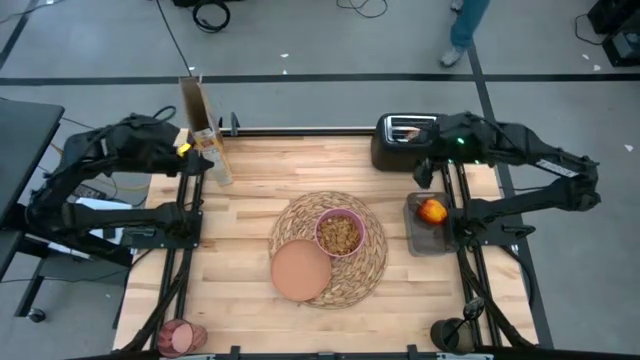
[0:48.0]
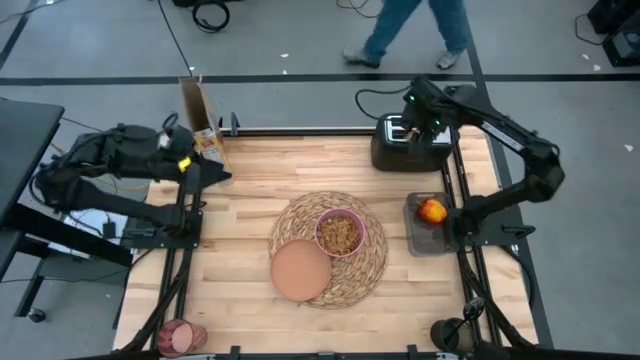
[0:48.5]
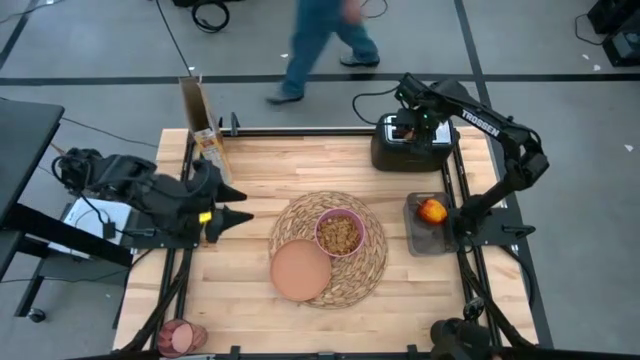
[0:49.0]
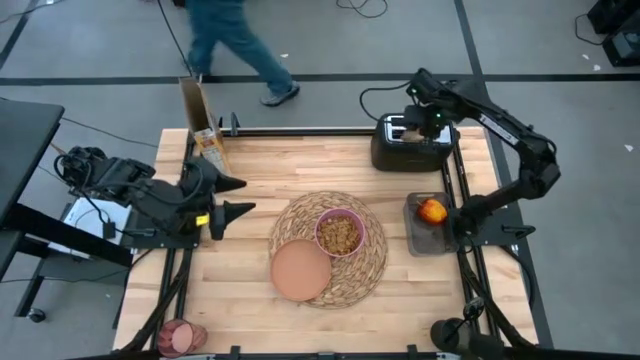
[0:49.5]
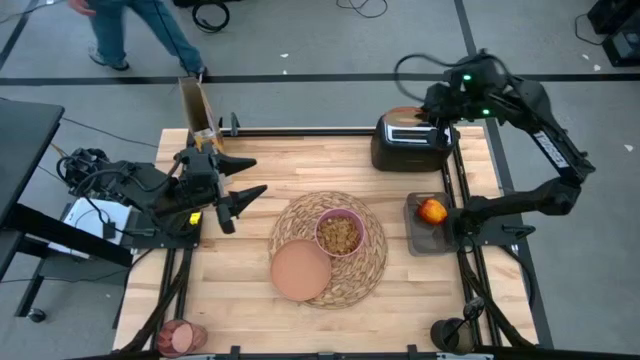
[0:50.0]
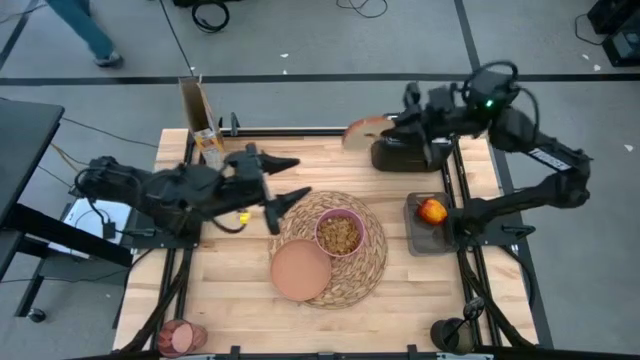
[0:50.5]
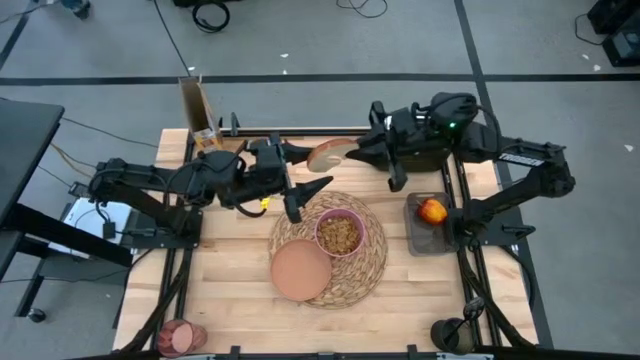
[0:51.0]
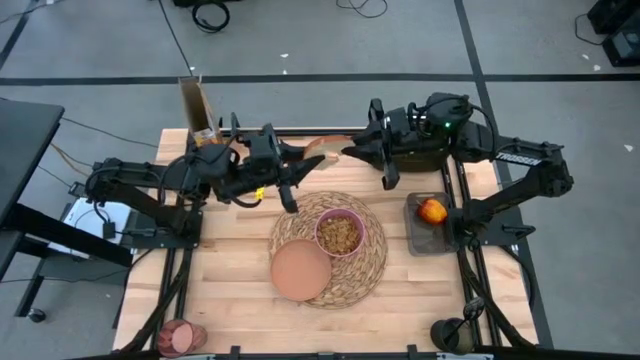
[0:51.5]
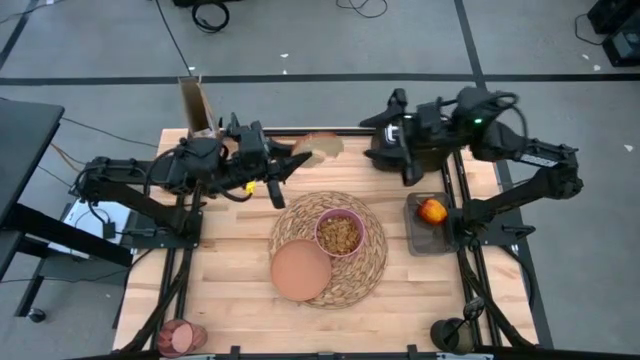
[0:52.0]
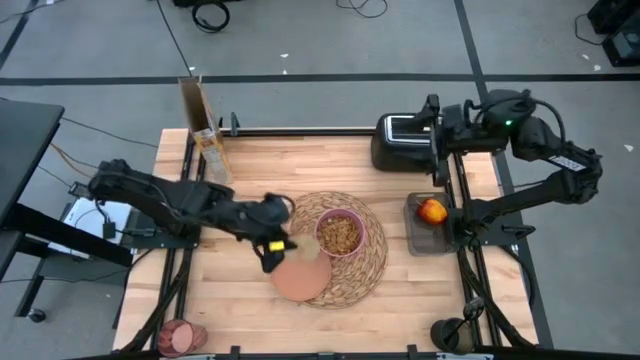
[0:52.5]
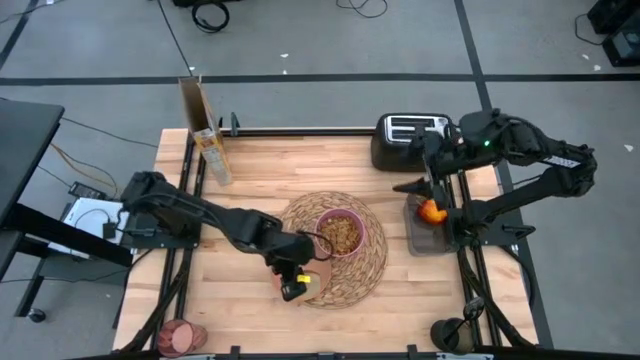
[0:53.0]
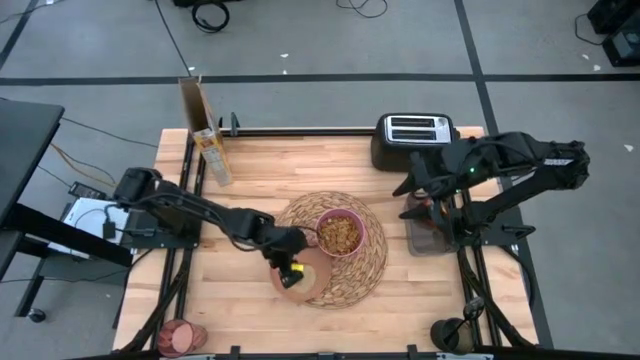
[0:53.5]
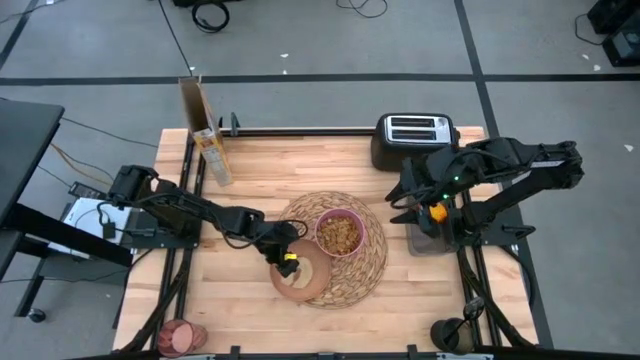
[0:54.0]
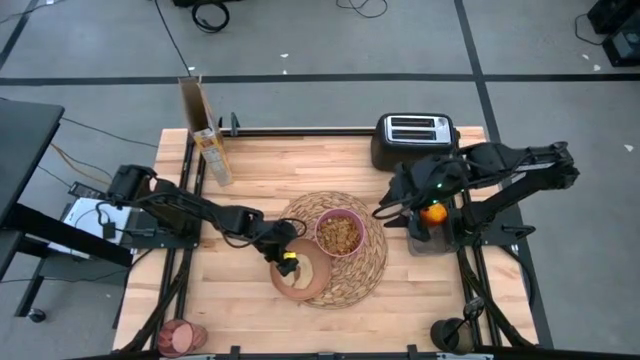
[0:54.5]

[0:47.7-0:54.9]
Task: Arrange a breakfast setting
Put the toasted bread on the light orange plate

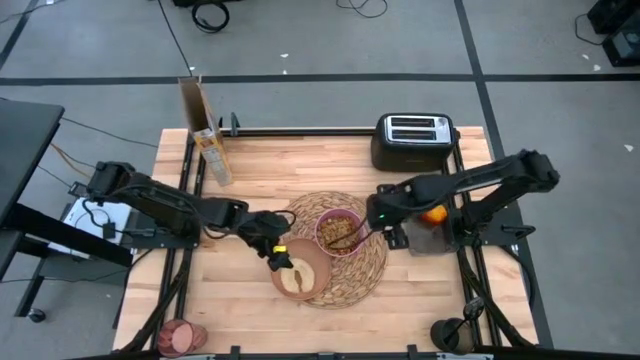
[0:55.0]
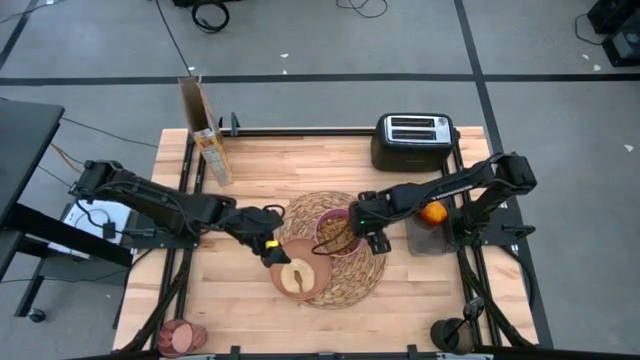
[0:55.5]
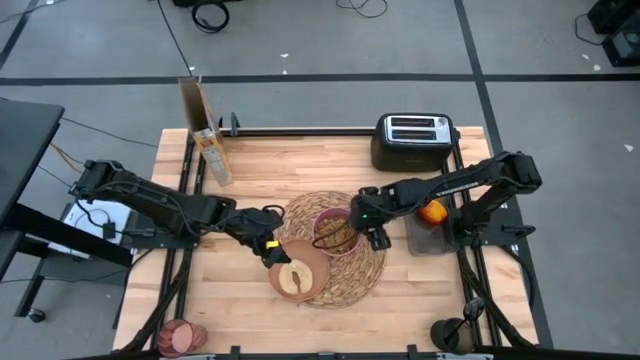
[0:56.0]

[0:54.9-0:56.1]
Adjust the pink bowl

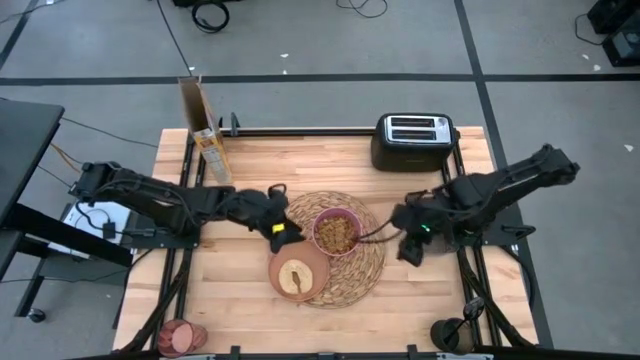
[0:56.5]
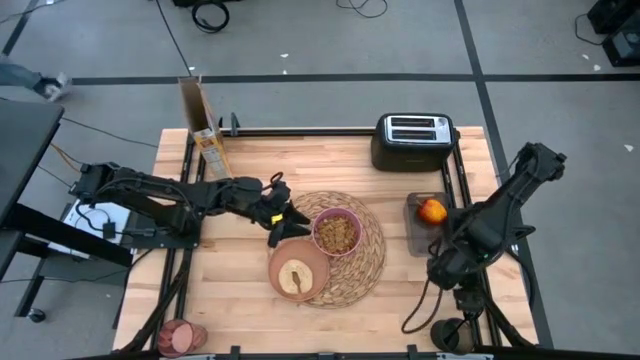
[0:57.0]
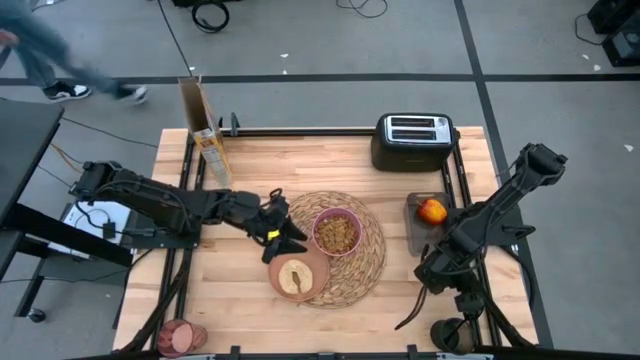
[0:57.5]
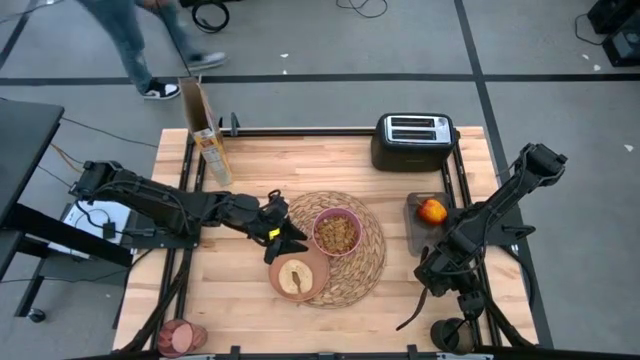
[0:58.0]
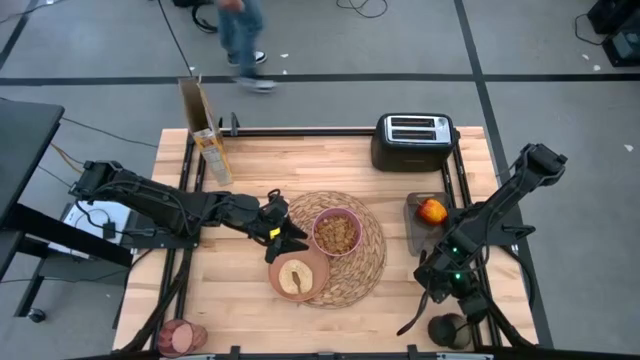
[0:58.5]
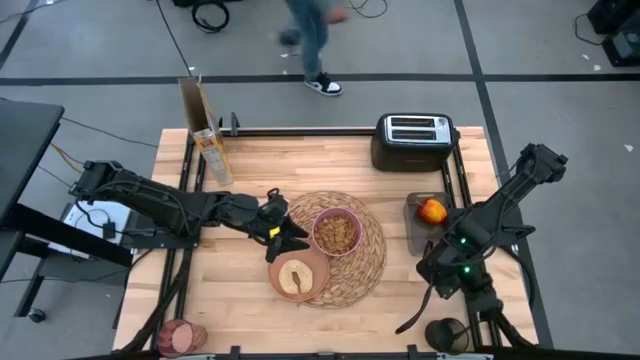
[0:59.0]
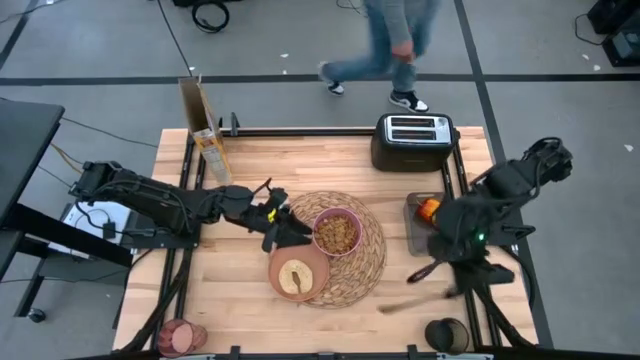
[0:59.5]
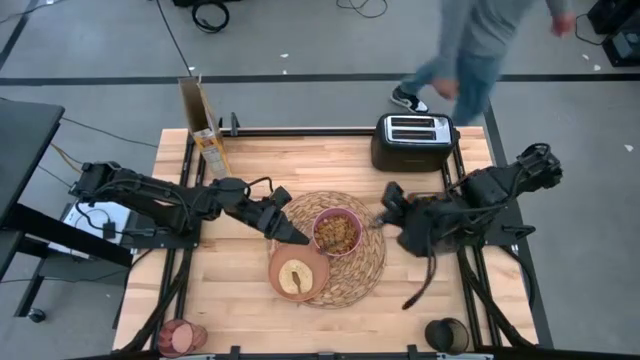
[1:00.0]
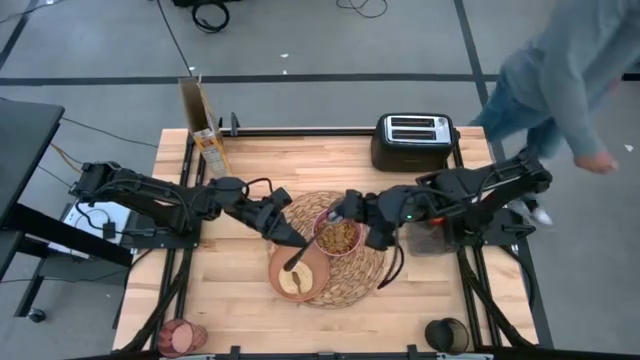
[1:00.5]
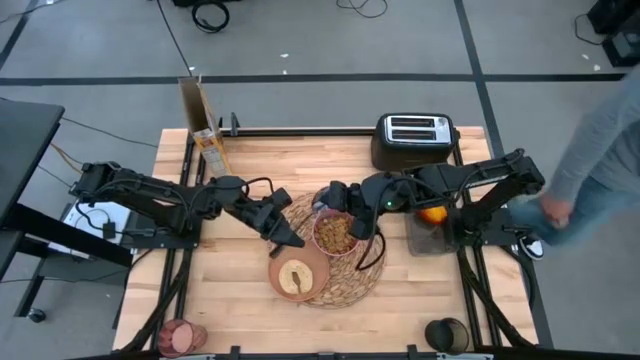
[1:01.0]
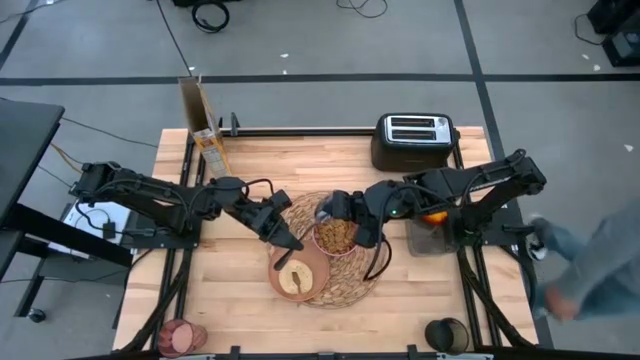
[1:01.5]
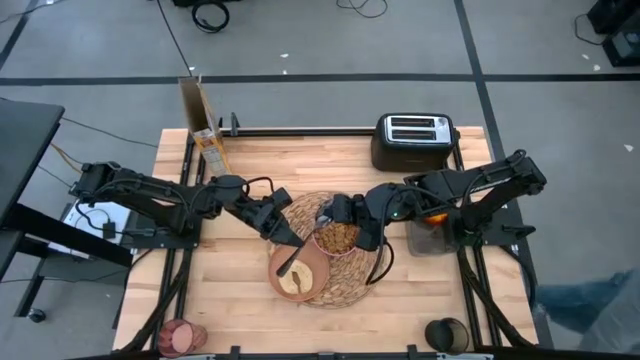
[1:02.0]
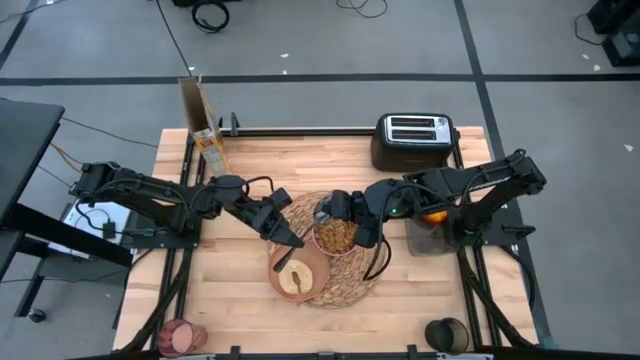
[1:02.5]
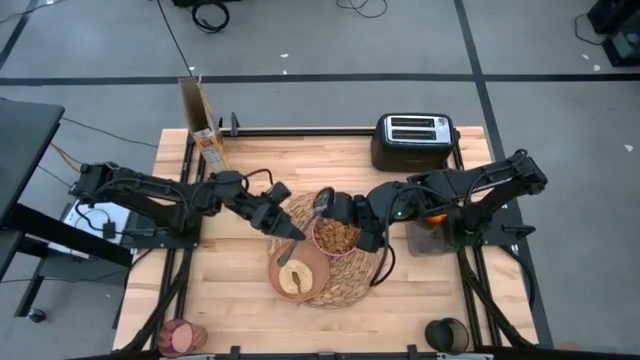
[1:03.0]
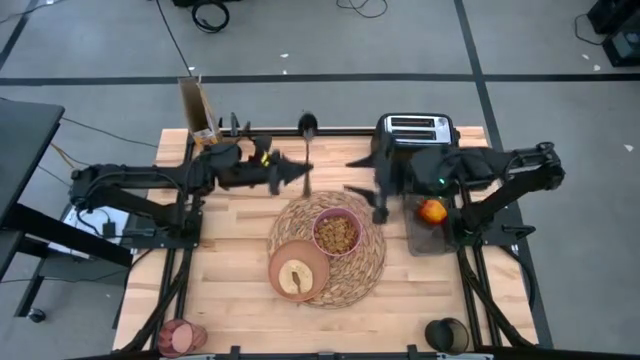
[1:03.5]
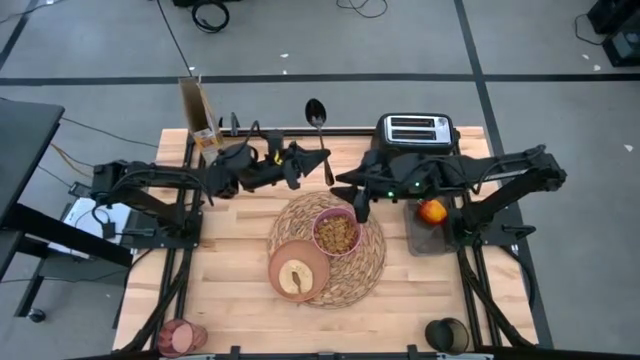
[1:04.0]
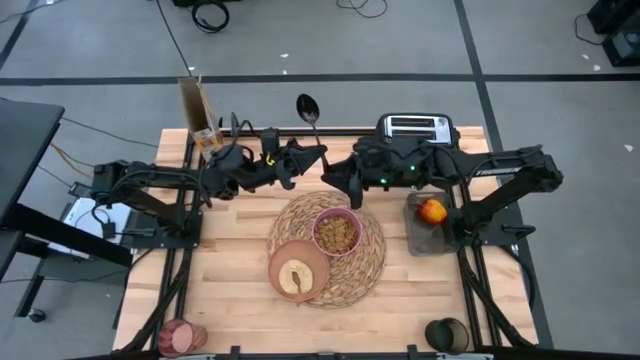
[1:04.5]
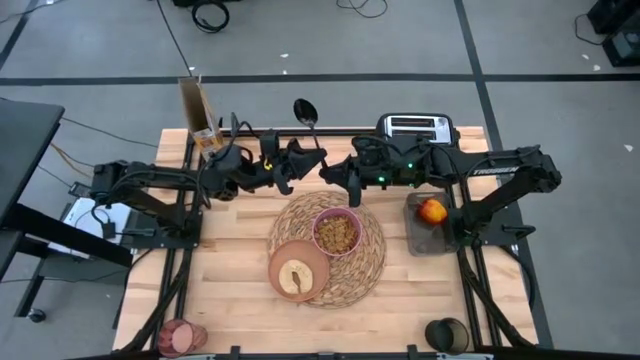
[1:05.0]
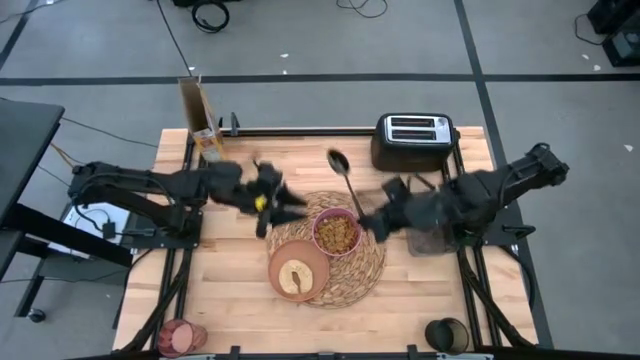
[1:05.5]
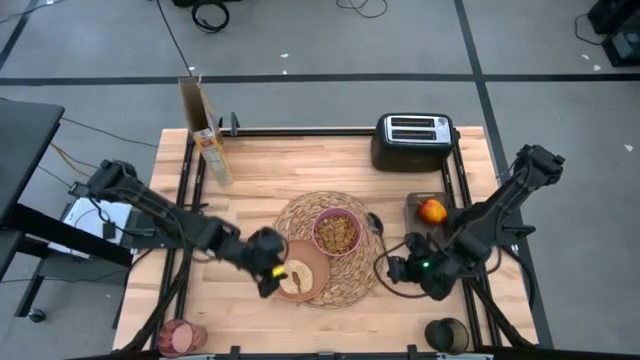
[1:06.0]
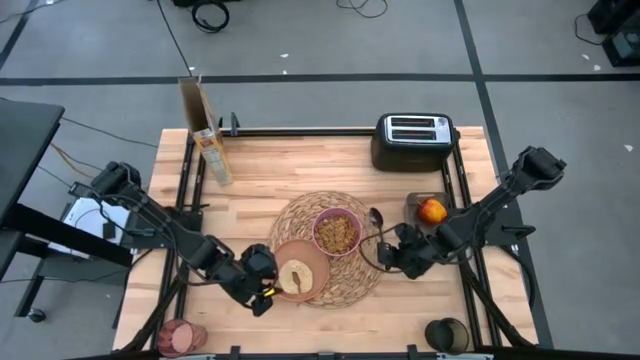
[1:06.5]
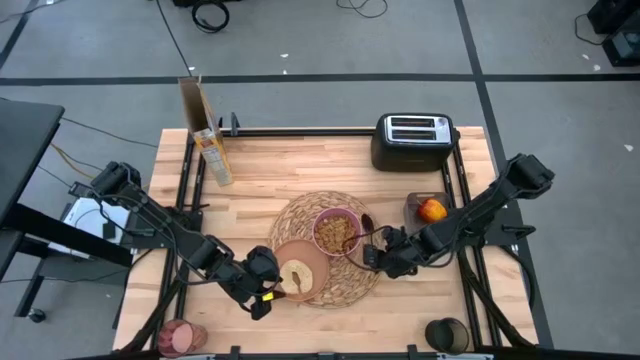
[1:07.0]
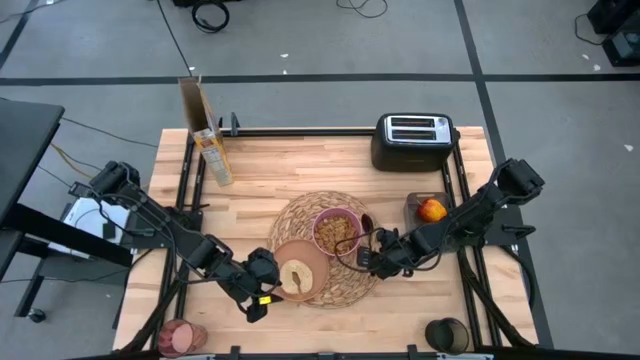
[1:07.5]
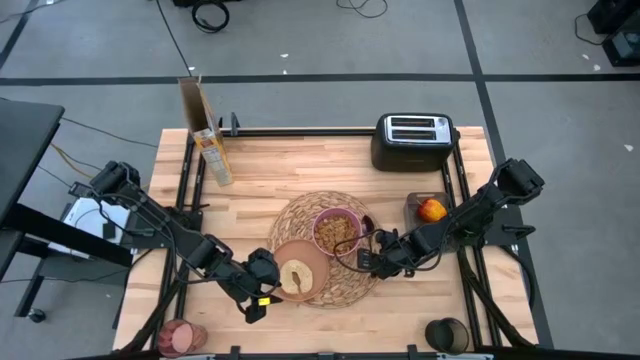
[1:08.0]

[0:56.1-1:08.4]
Put the black spoon on the brown placemat to the right side of the pink bowl
